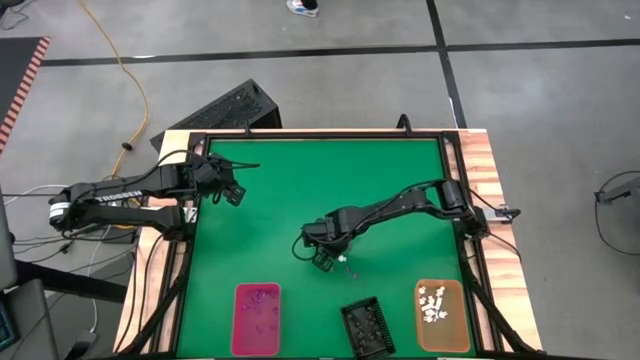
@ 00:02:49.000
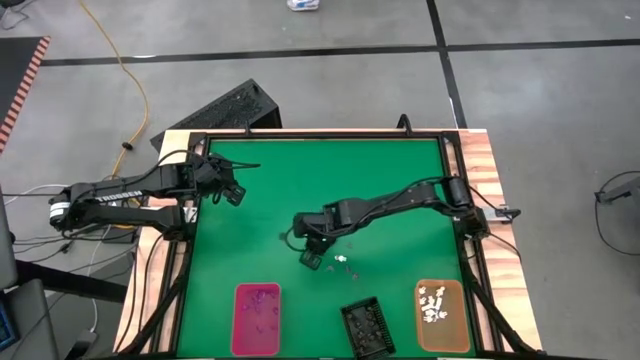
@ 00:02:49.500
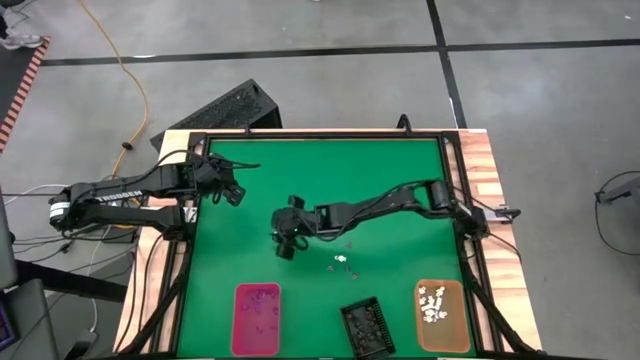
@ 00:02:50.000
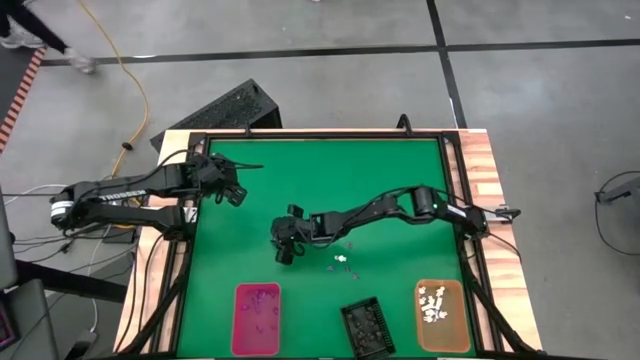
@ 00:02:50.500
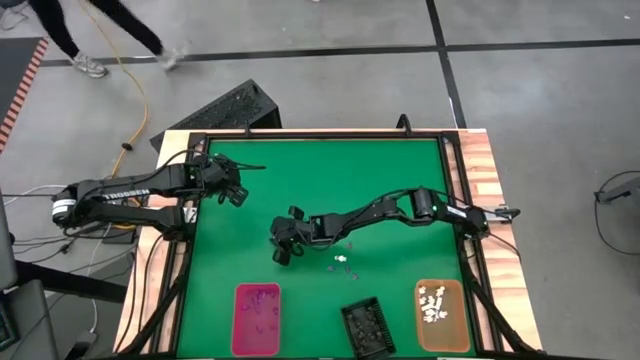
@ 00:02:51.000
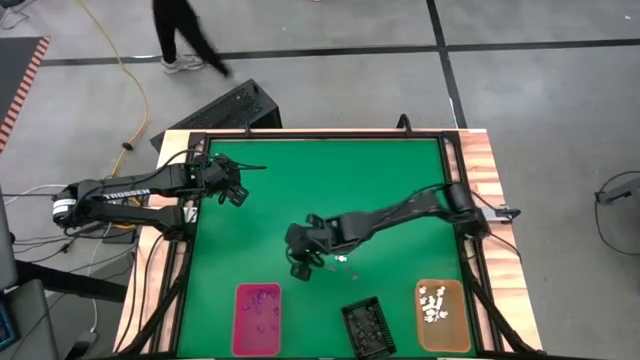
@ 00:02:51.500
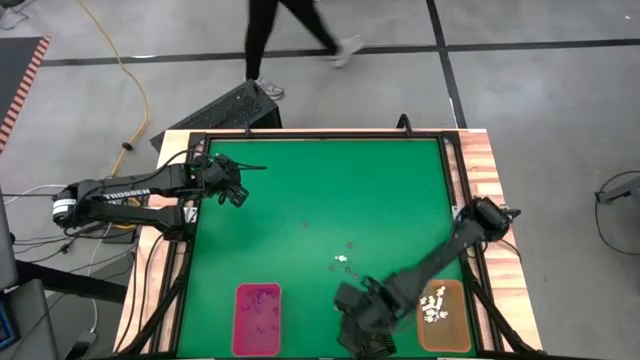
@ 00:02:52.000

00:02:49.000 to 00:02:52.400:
Task: Sort Halloween decoration
Put the black skull toy into the black organizing bin

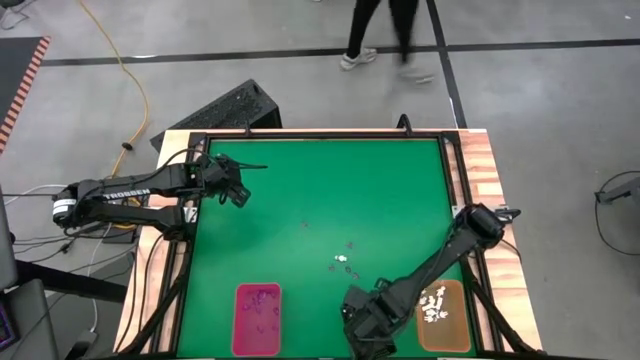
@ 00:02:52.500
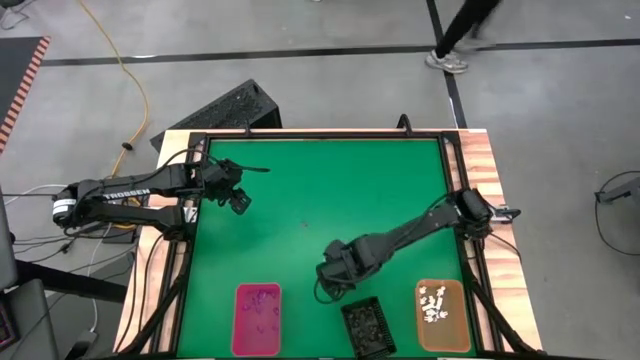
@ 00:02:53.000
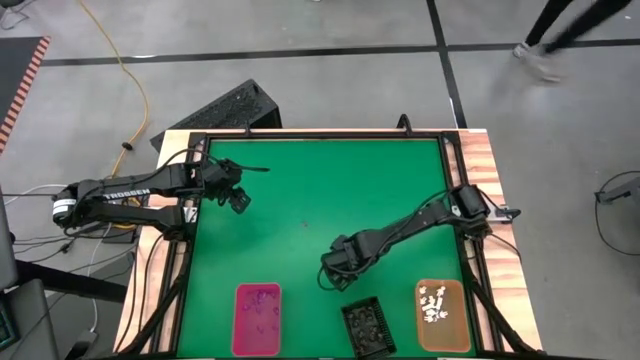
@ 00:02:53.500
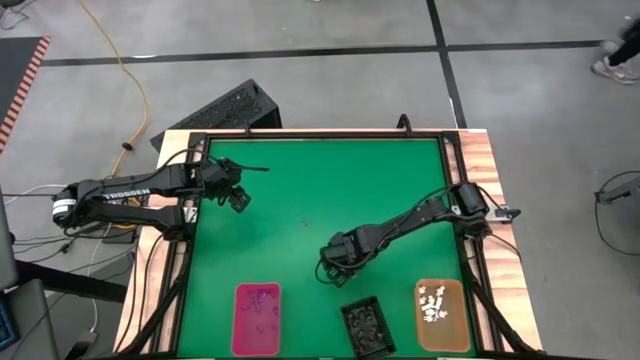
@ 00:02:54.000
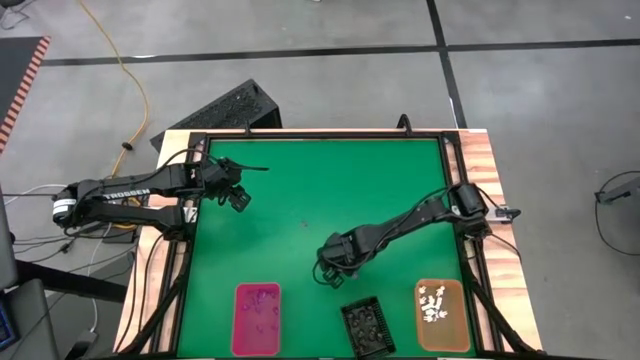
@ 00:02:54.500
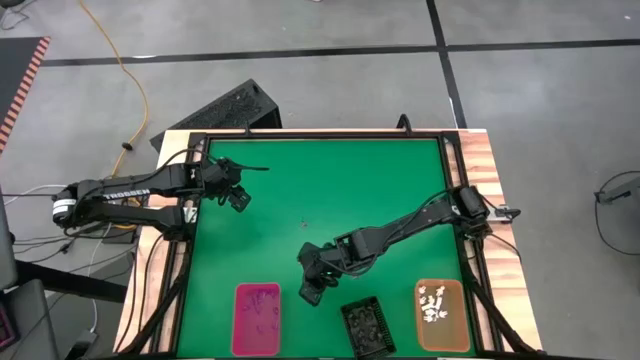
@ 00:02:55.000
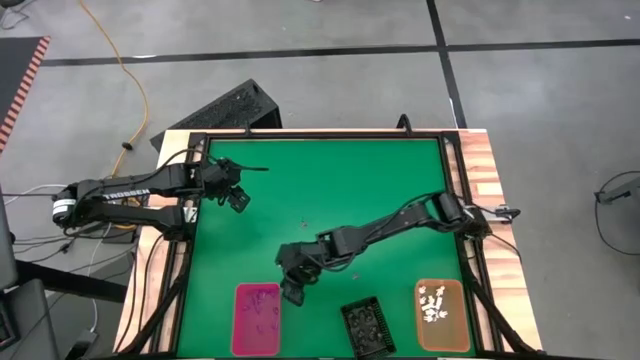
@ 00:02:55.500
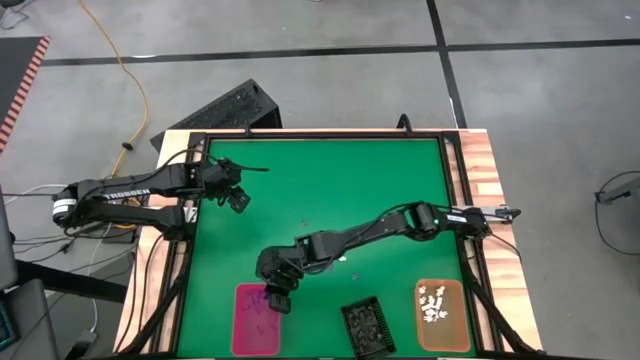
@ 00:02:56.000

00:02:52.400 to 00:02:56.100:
Put the violet witch hat toy into the red organizing bin

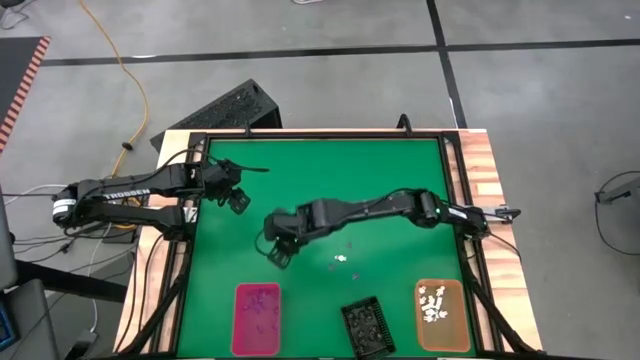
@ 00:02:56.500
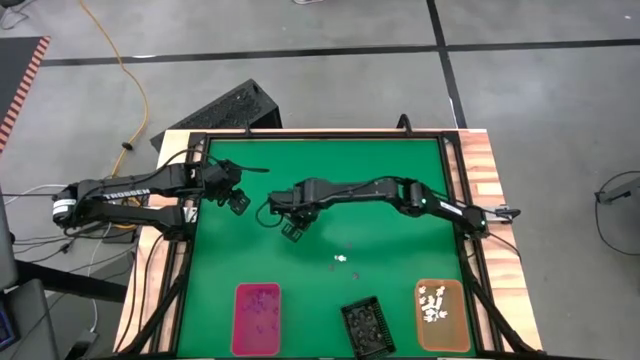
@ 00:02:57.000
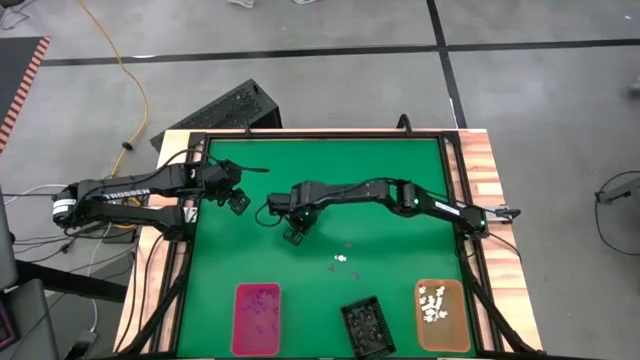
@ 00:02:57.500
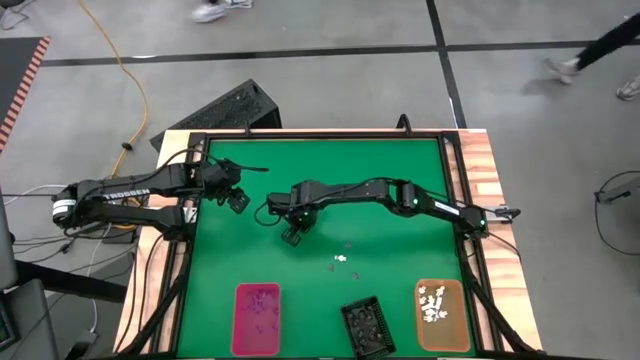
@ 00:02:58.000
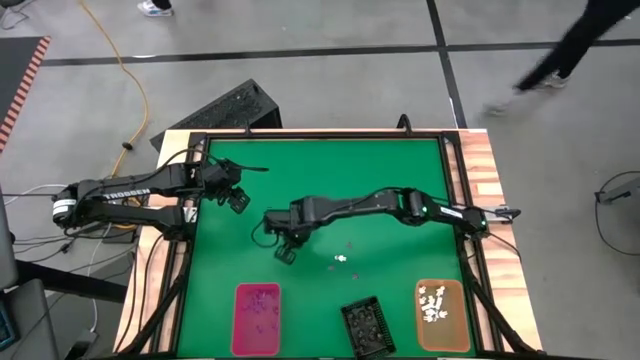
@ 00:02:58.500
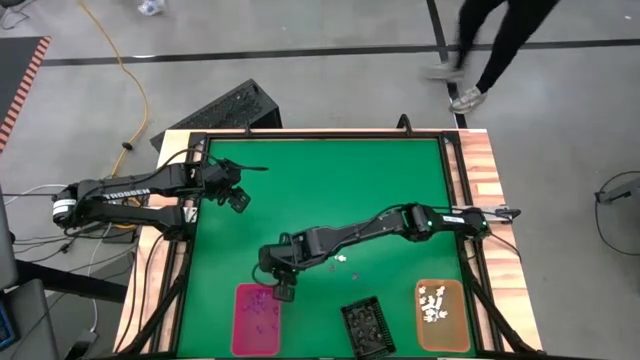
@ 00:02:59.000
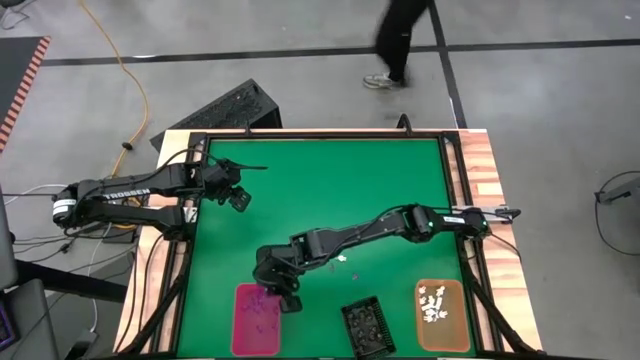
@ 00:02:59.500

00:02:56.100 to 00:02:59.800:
Put the violet witch hat toy into the red organizing bin

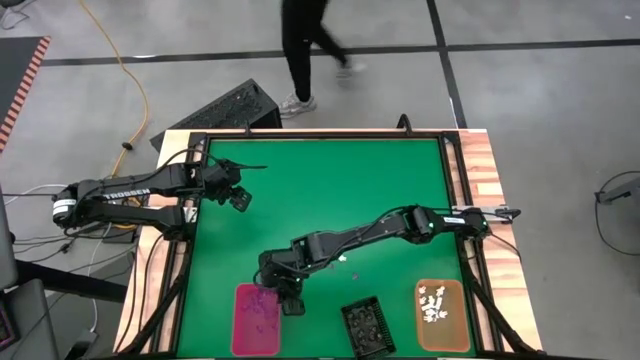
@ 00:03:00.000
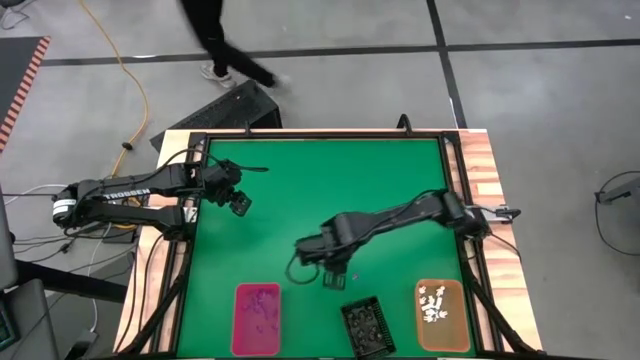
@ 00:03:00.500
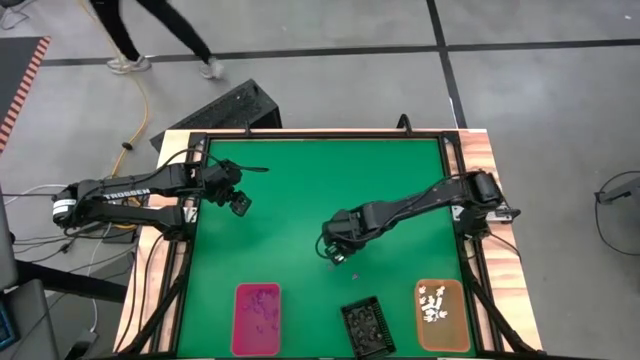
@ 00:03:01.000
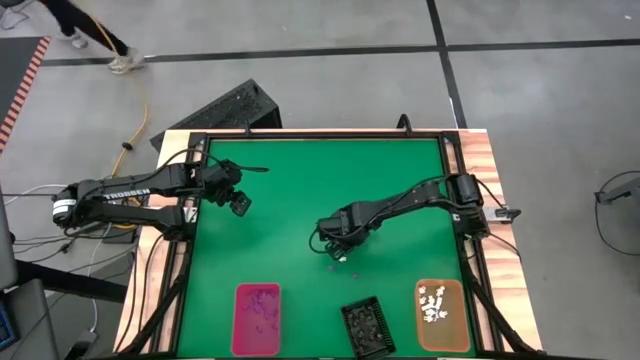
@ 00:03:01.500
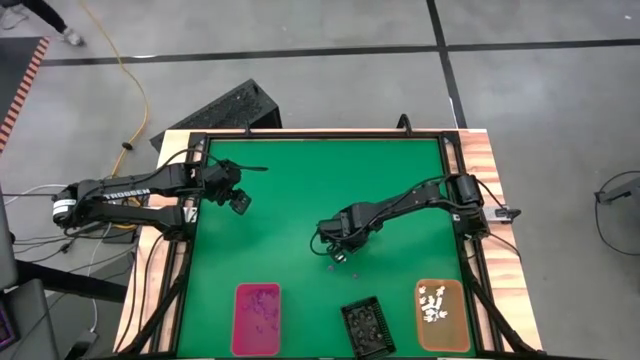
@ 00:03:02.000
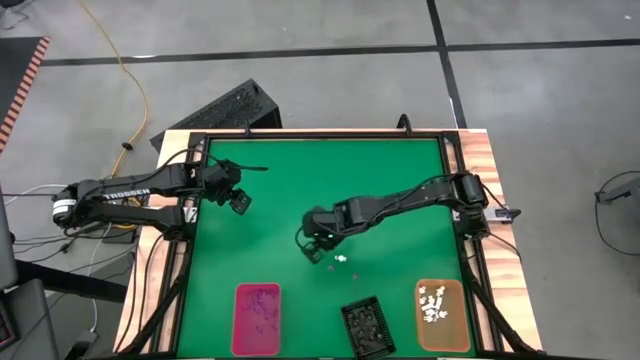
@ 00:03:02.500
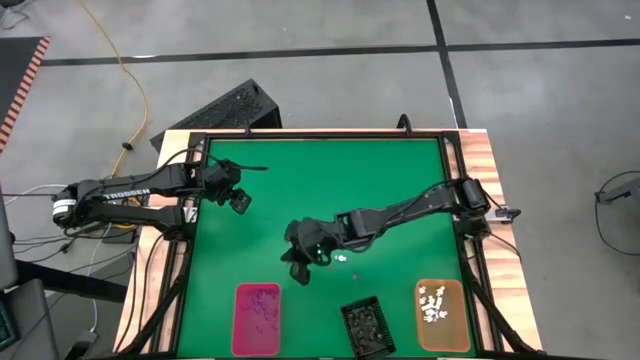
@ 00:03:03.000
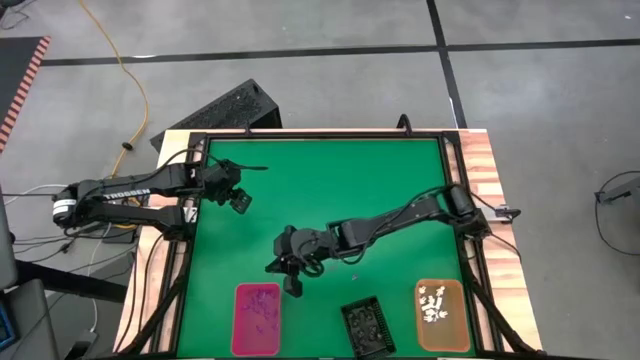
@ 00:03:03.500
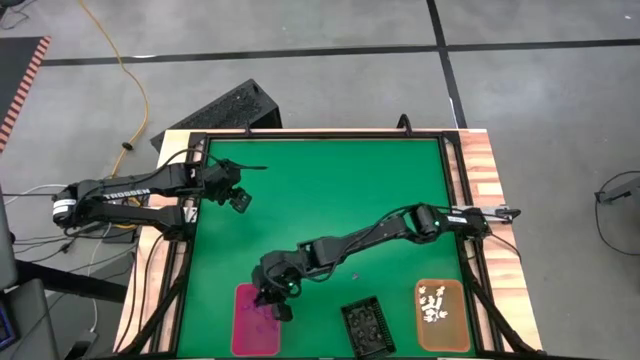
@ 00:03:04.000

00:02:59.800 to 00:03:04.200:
Put the violet witch hat toy into the red organizing bin

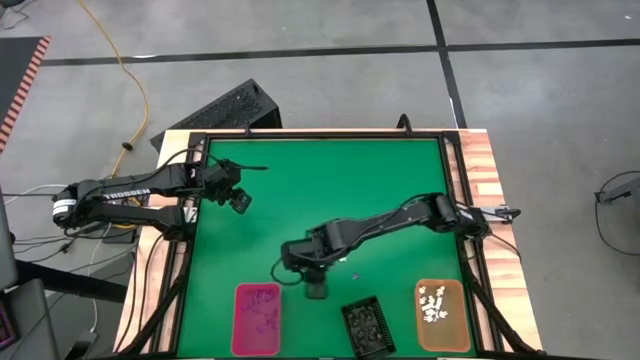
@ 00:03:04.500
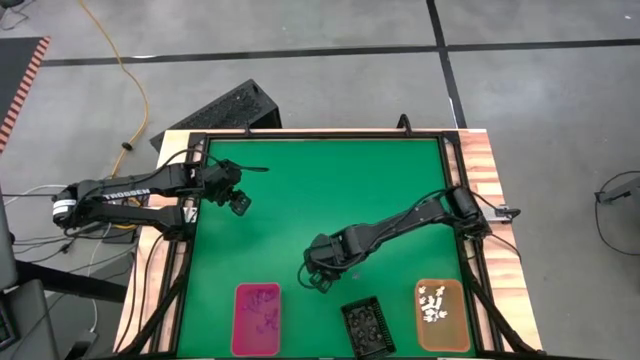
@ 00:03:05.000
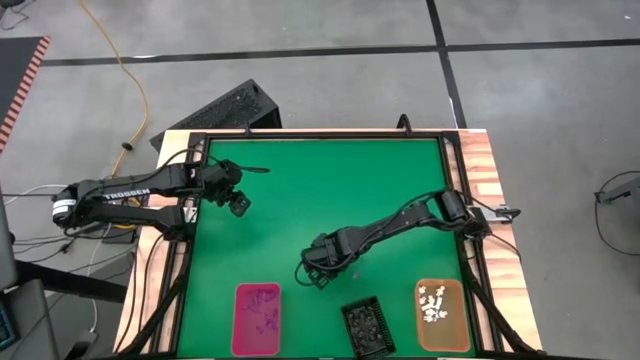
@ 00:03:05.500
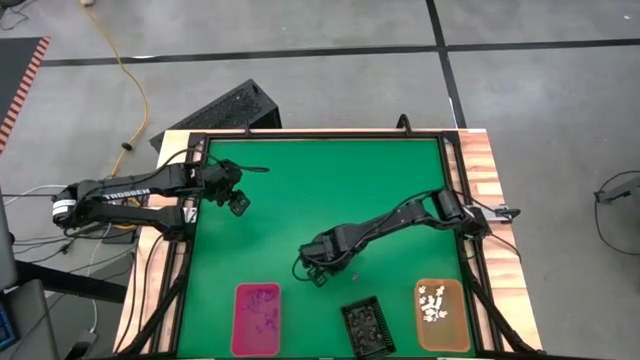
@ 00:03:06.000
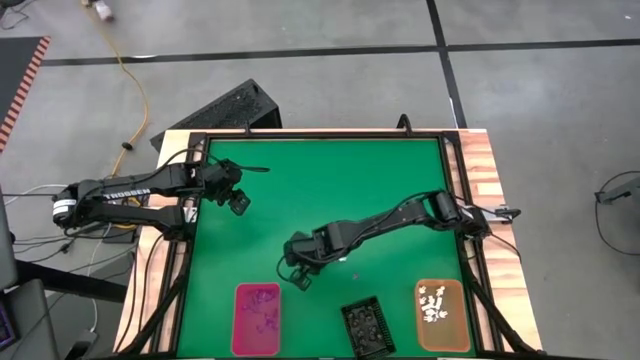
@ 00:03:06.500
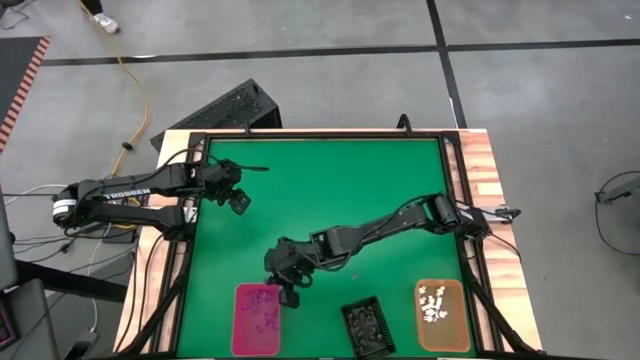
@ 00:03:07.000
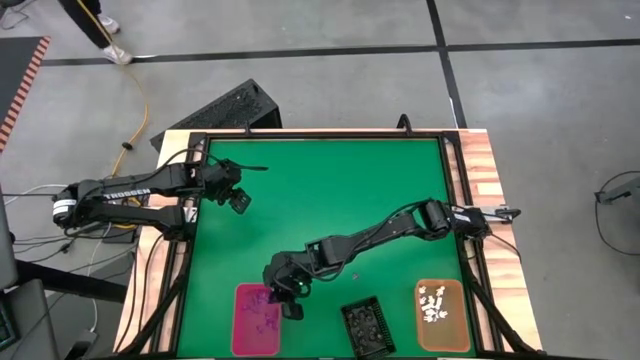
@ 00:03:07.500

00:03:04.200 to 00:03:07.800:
Put the violet witch hat toy into the red organizing bin

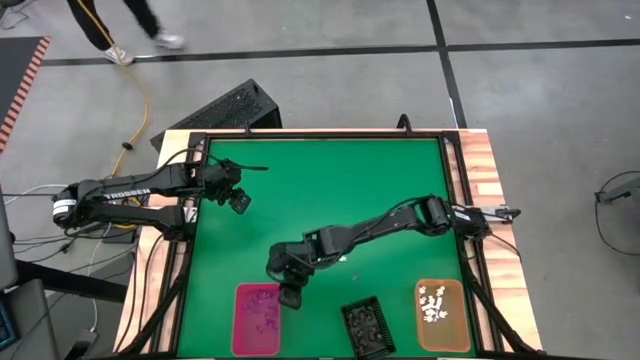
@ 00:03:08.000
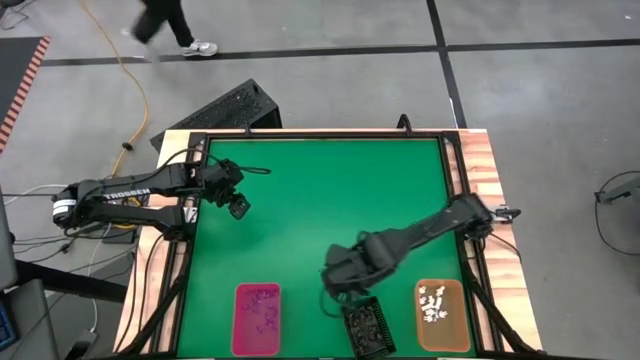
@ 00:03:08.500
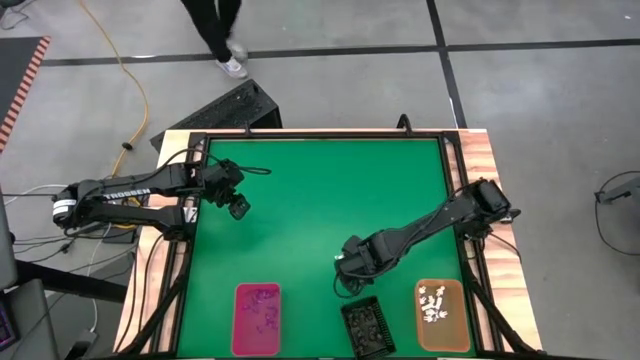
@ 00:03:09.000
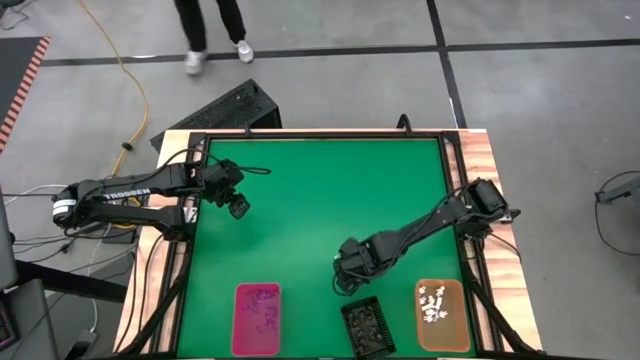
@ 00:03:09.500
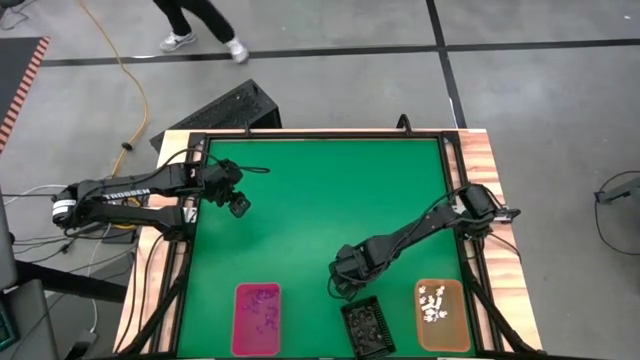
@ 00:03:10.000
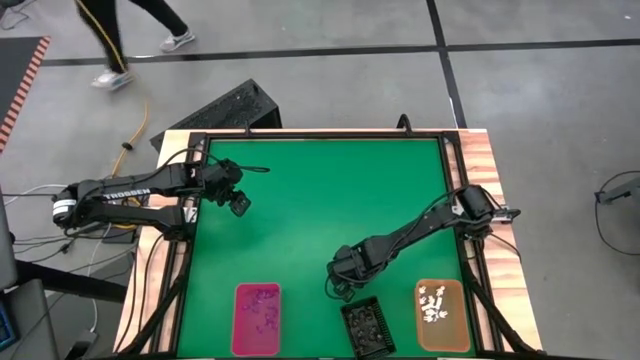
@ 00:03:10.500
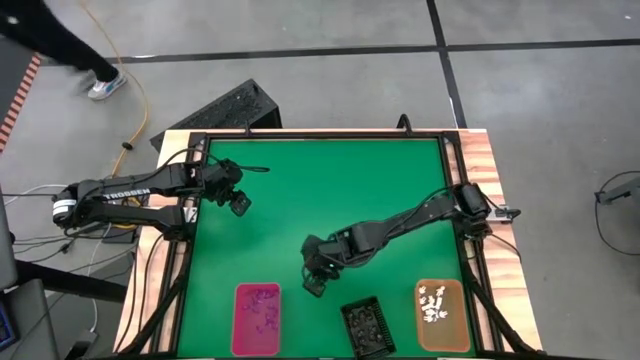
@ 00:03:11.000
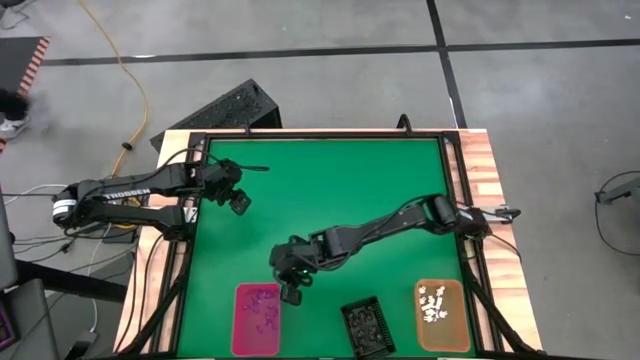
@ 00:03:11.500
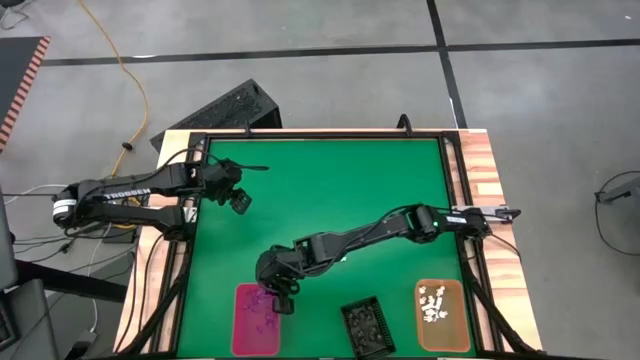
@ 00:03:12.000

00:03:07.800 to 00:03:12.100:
Put the violet witch hat toy into the red organizing bin
